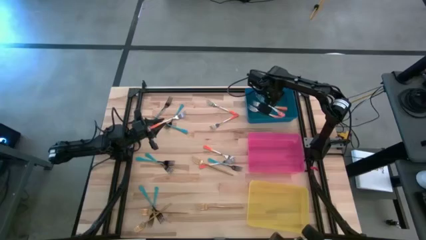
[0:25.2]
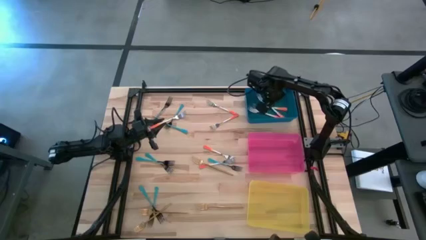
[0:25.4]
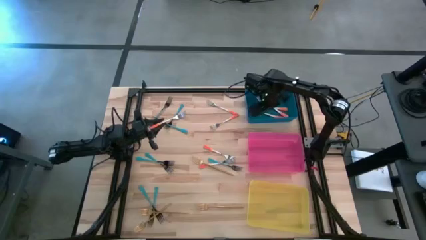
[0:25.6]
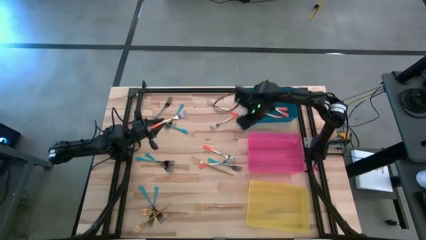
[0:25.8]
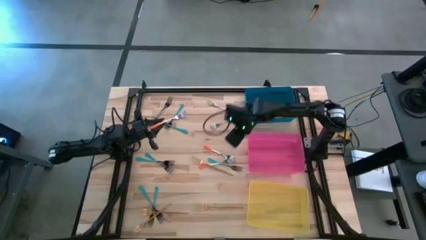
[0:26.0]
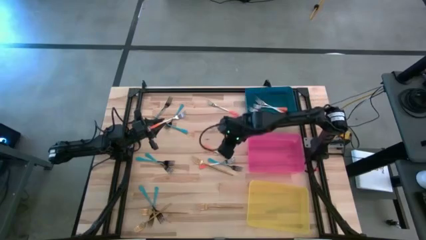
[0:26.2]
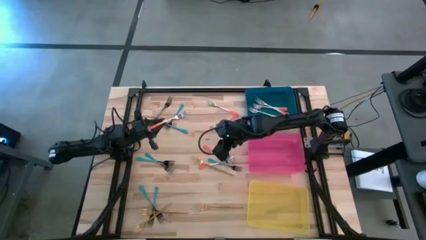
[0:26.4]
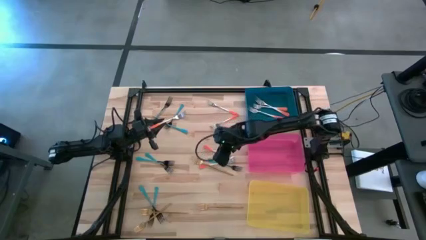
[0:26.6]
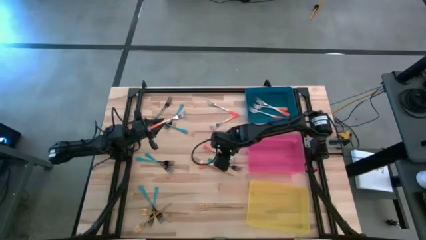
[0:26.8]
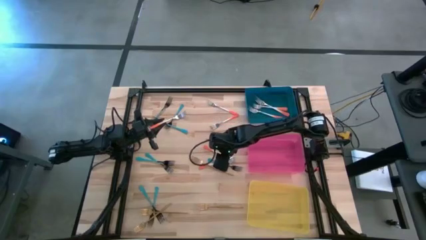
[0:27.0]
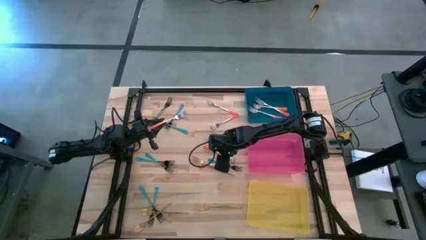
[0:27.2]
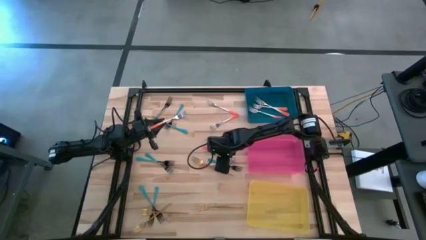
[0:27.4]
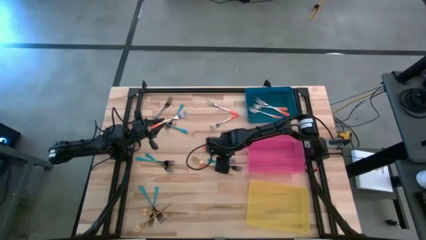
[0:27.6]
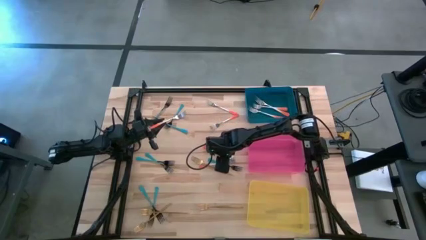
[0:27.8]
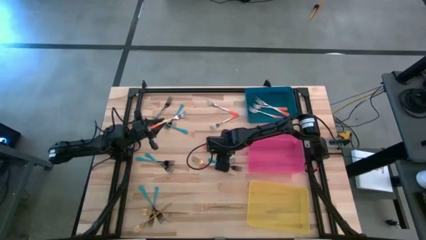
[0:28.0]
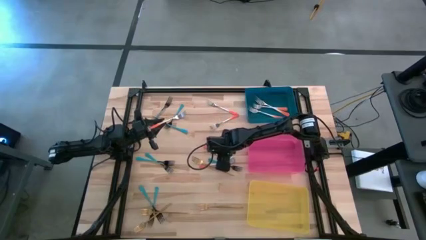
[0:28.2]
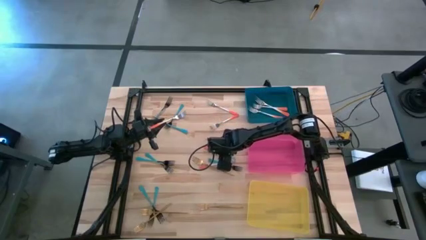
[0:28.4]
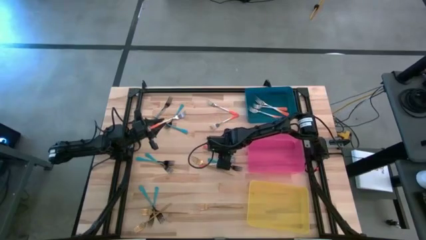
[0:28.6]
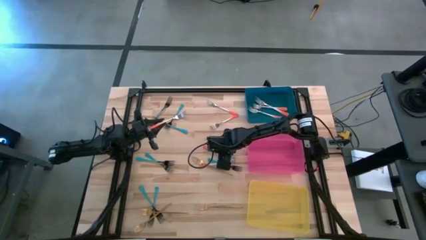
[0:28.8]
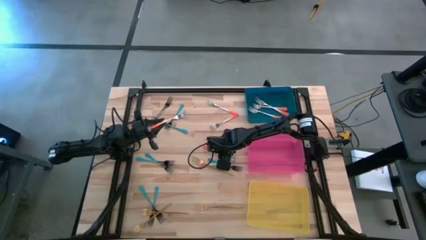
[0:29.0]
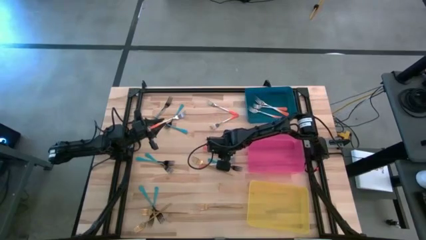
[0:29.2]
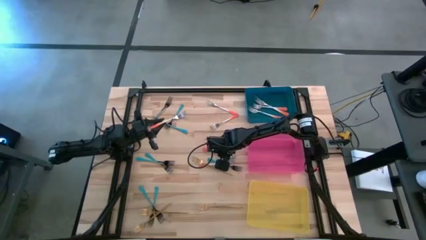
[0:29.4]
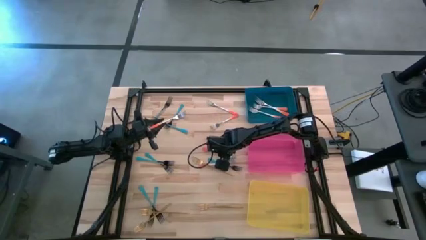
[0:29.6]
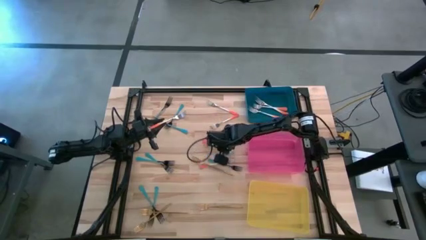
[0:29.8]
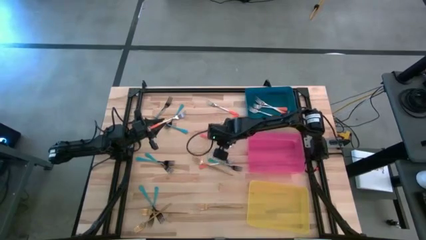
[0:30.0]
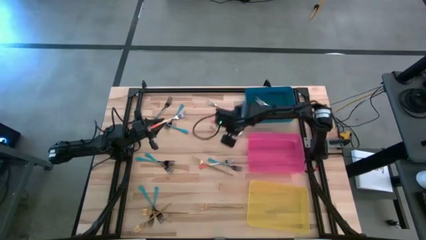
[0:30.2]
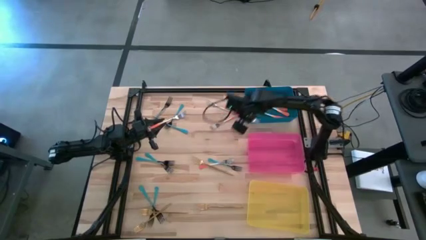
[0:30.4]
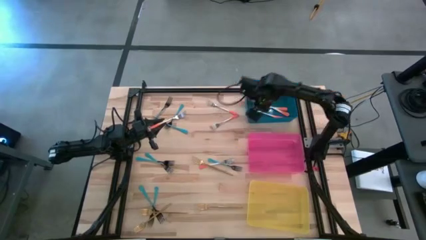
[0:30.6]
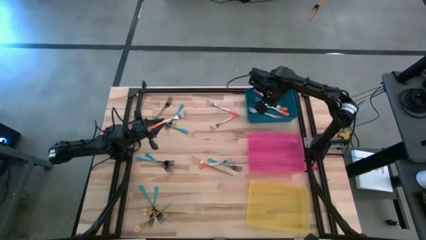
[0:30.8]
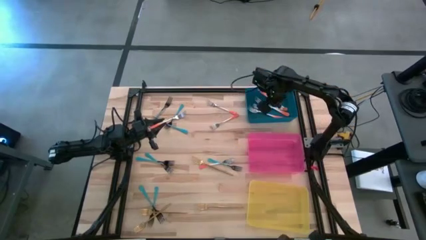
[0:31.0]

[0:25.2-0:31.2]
Task: Sort silverware by color (type)
Put the orange fork into the blue bin

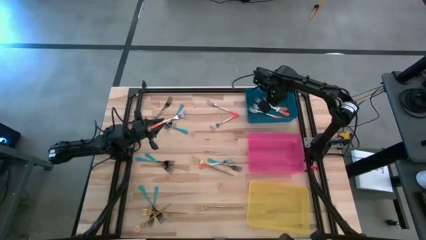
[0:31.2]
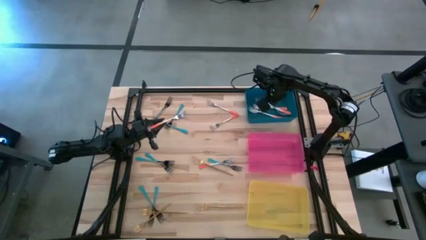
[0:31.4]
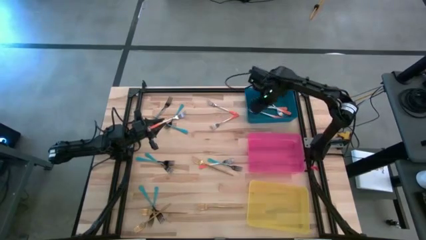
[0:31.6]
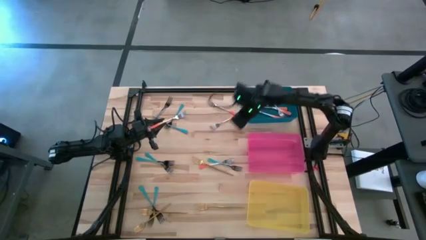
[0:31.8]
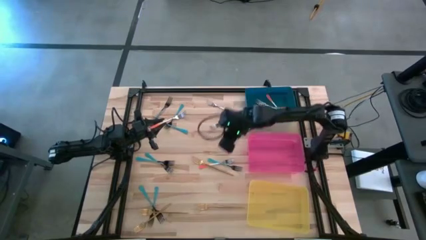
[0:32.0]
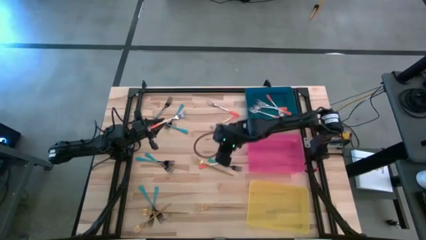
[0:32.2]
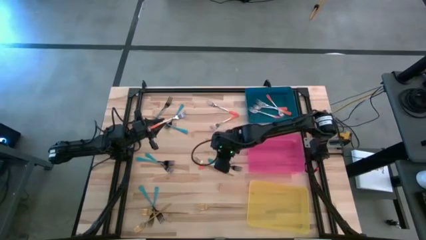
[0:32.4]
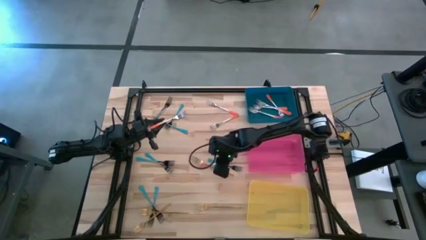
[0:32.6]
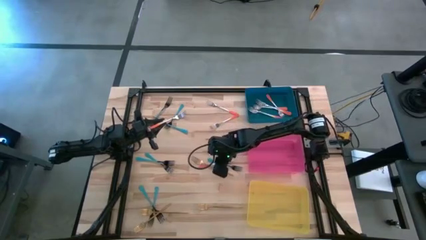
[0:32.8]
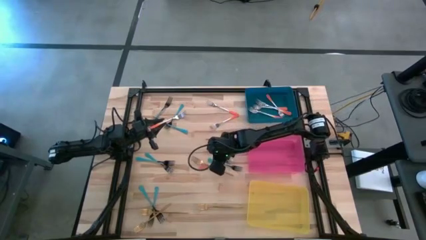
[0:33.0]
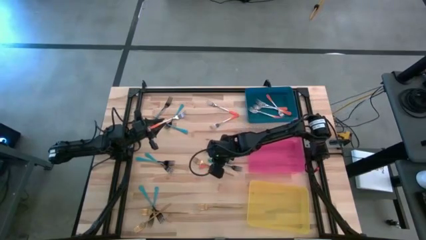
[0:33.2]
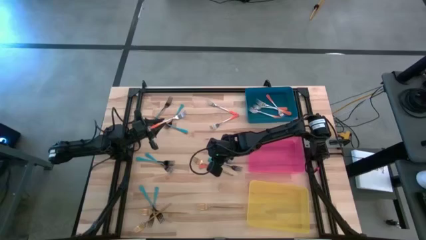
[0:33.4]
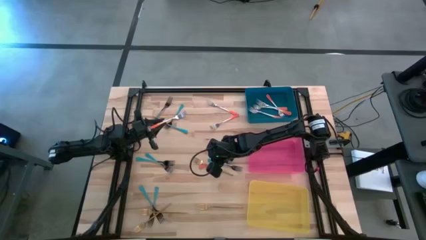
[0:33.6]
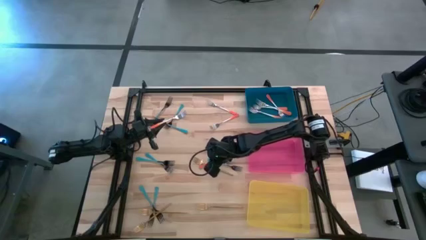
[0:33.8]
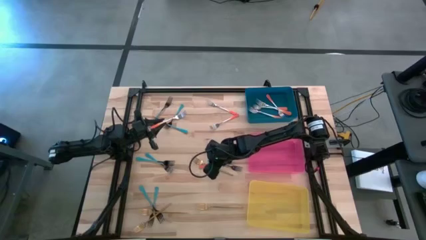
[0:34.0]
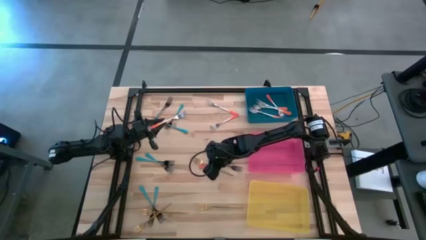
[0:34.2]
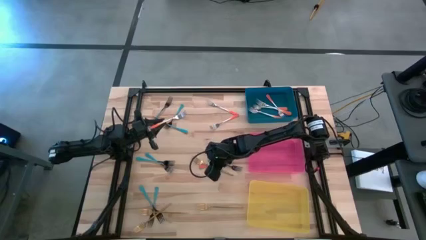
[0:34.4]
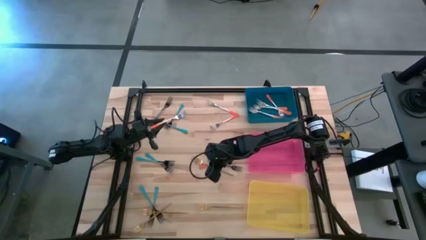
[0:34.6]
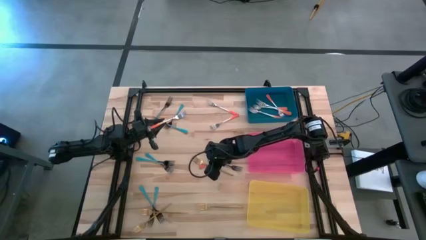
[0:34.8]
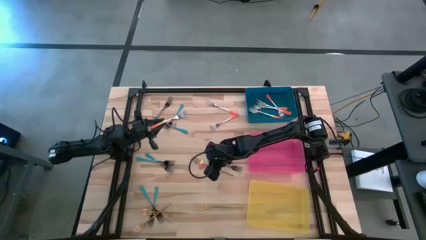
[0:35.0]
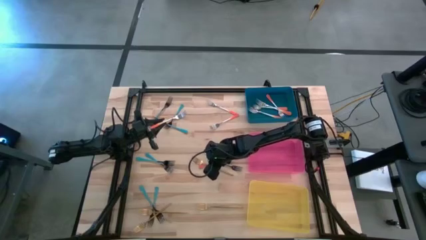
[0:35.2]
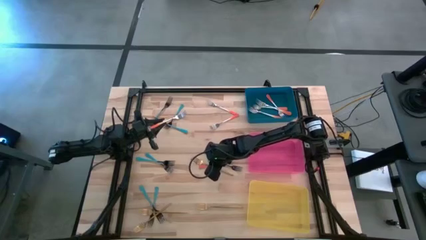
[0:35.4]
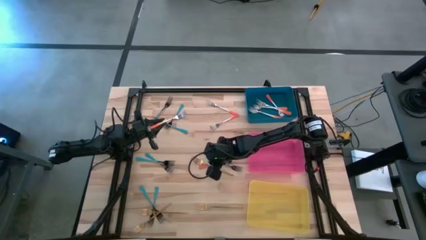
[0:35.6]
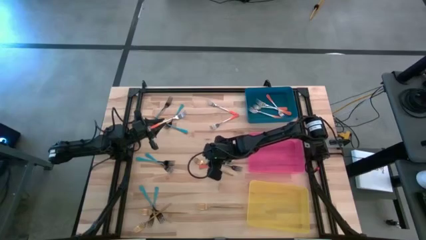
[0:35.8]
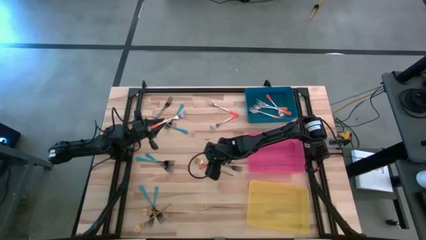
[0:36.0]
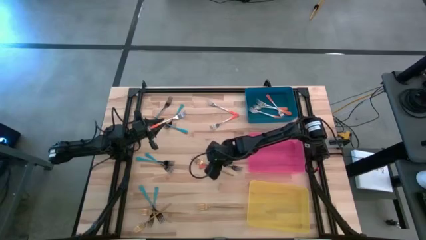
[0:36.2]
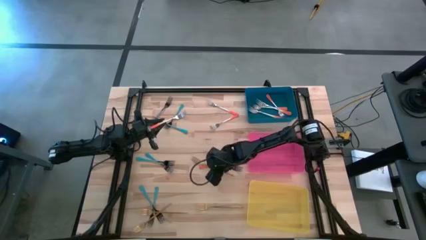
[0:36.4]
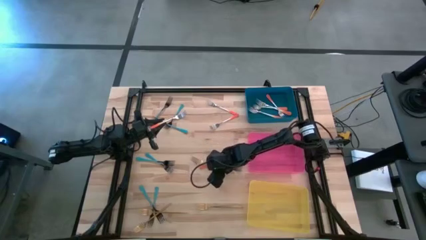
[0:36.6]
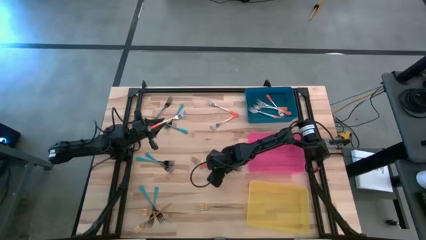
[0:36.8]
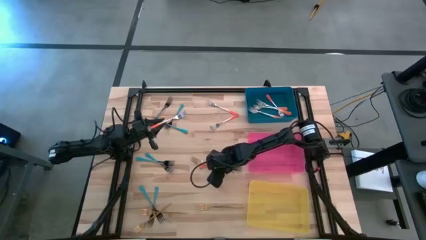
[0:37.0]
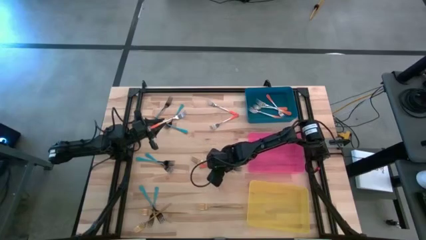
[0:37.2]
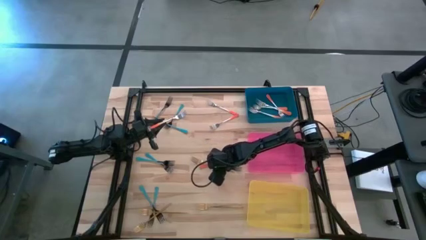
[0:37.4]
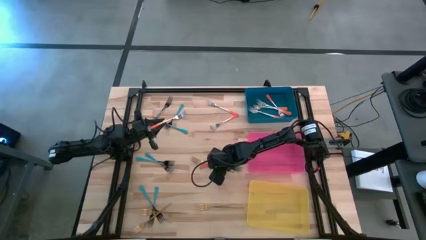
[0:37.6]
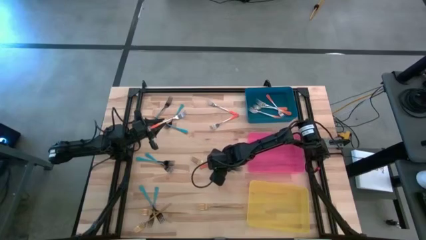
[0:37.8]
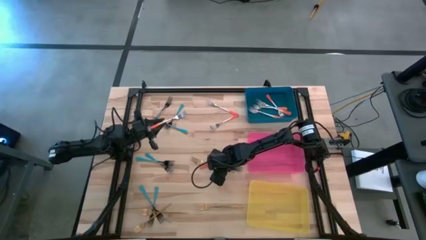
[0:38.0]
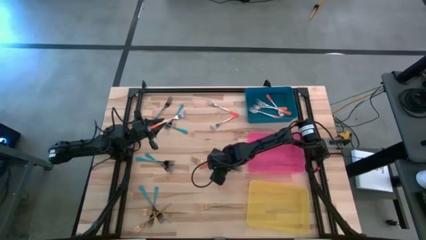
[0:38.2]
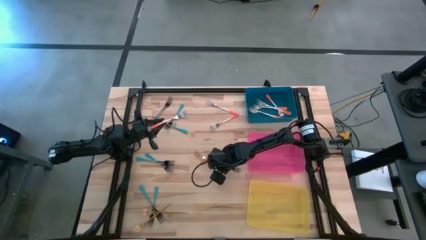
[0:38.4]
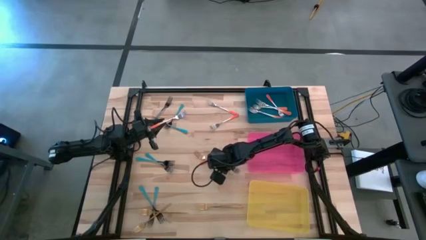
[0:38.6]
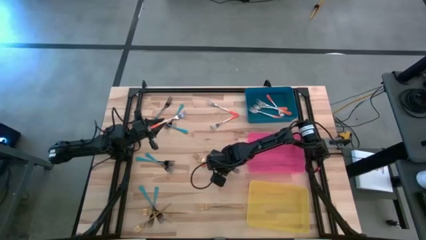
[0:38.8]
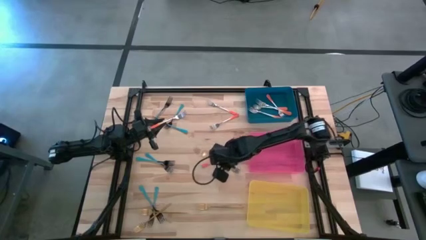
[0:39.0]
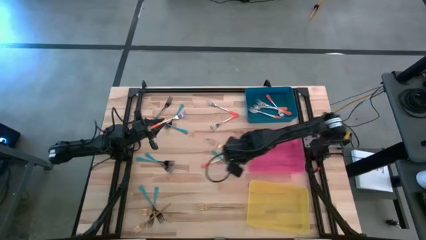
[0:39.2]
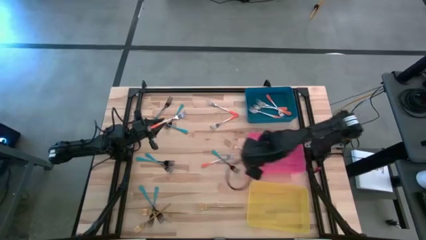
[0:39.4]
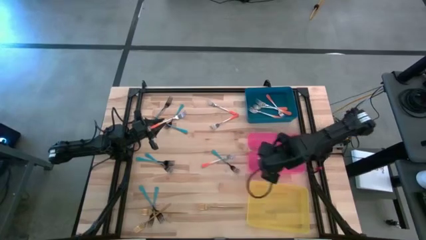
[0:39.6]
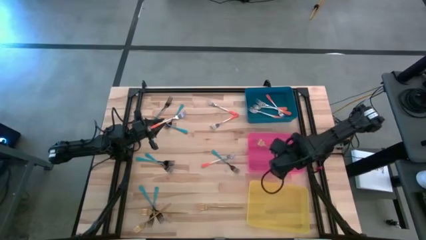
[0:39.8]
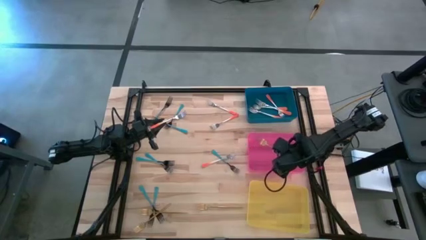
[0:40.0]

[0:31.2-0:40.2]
Put the gold fork into the pink bin

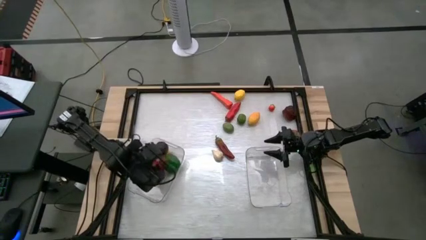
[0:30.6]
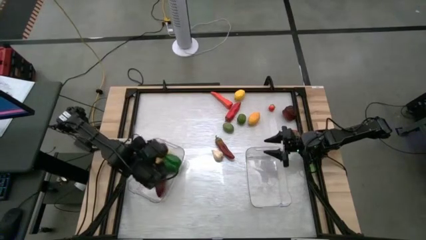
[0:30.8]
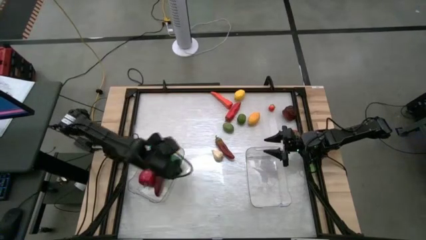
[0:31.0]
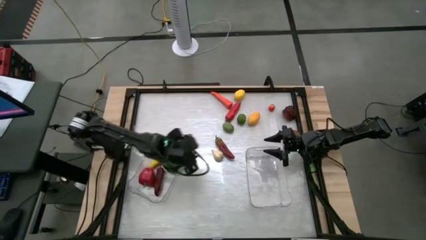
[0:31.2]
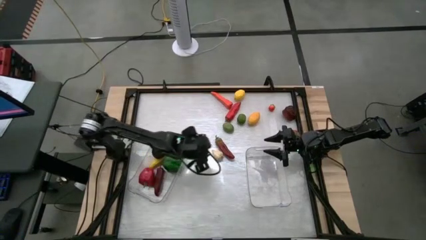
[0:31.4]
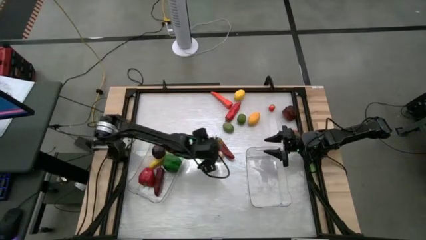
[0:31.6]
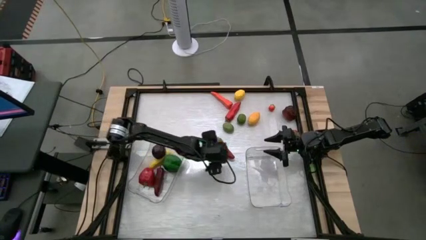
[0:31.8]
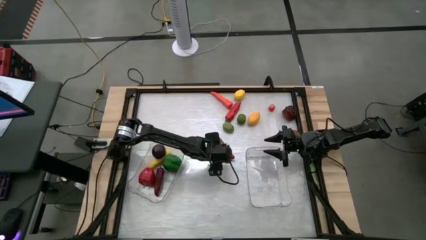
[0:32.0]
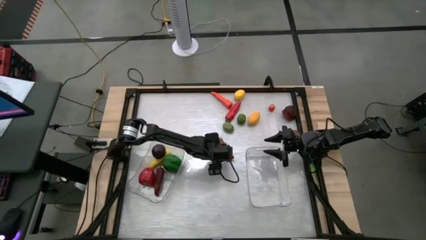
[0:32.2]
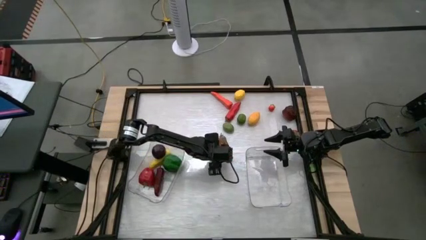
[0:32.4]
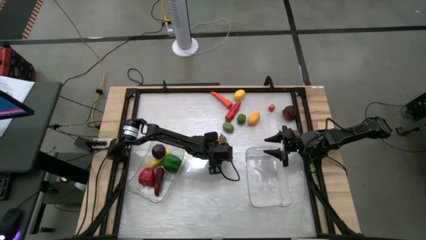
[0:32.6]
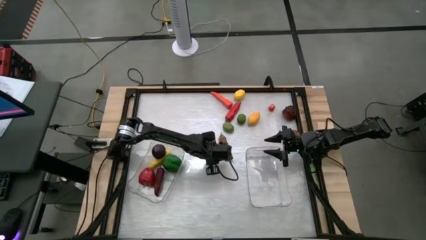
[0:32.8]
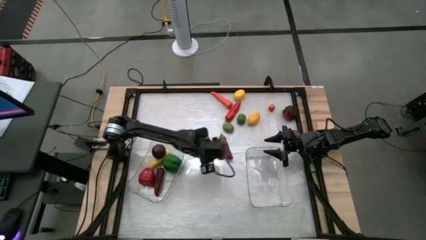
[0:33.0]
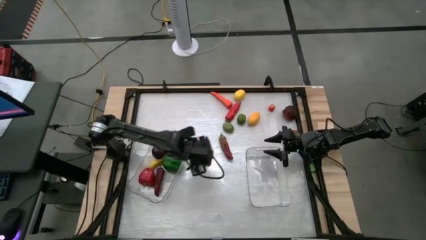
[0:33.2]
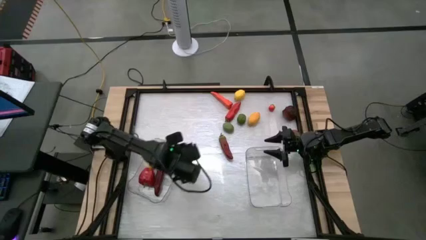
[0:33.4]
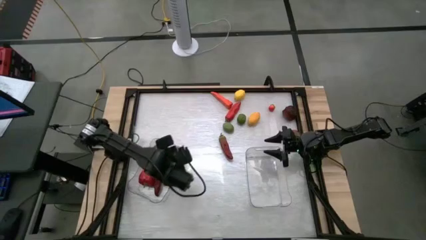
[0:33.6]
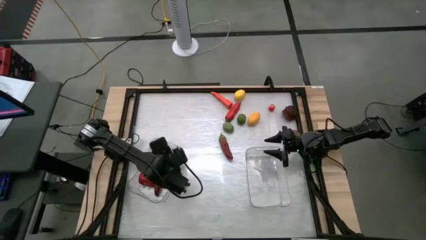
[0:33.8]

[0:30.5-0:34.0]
Task: Sort produce into baskets
Put the white garlic into the left transparent bin
